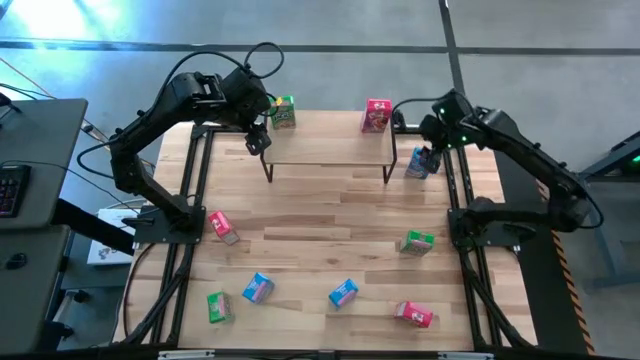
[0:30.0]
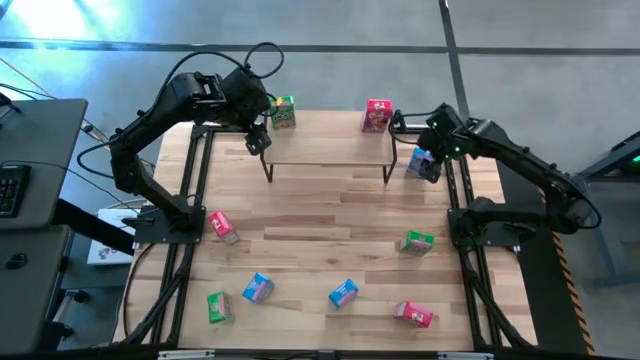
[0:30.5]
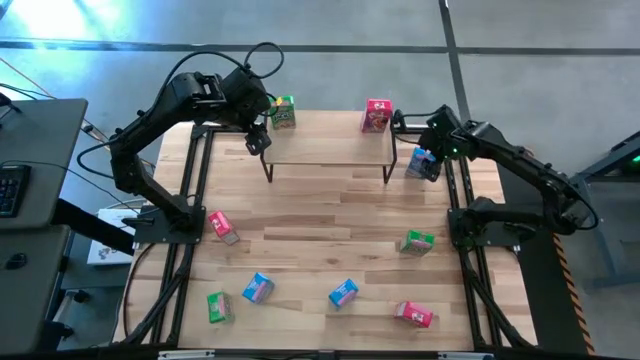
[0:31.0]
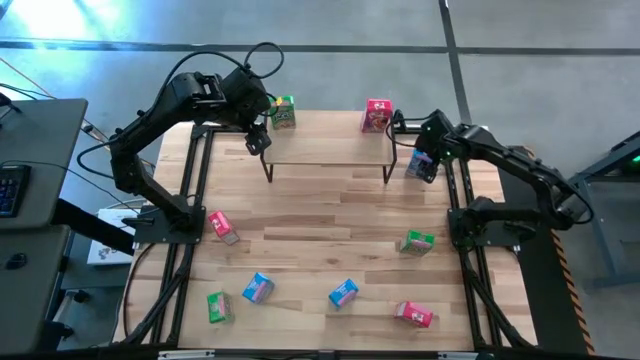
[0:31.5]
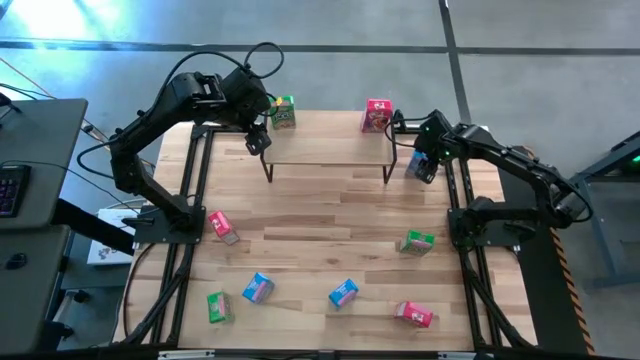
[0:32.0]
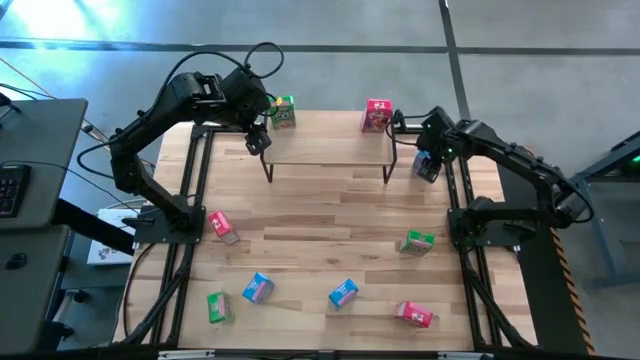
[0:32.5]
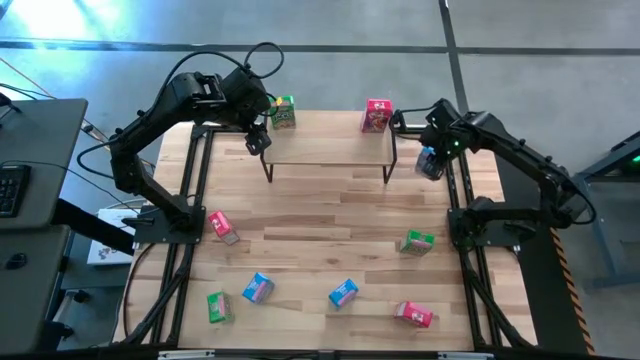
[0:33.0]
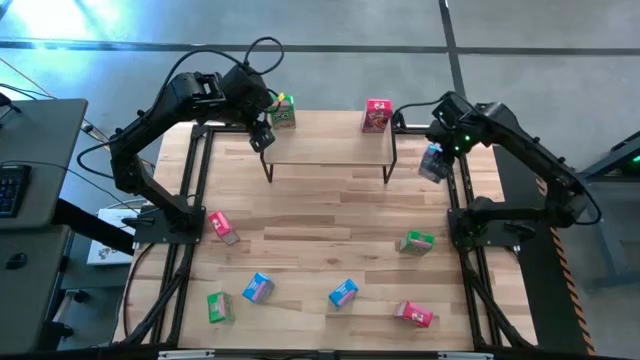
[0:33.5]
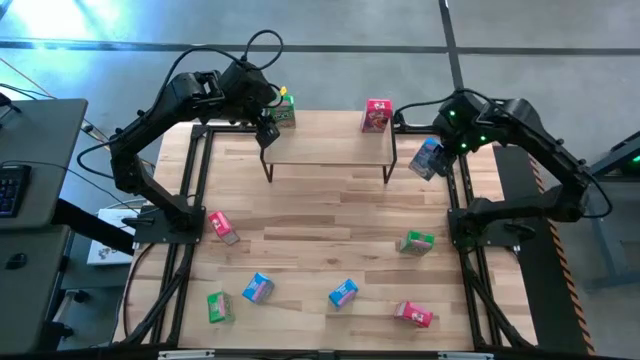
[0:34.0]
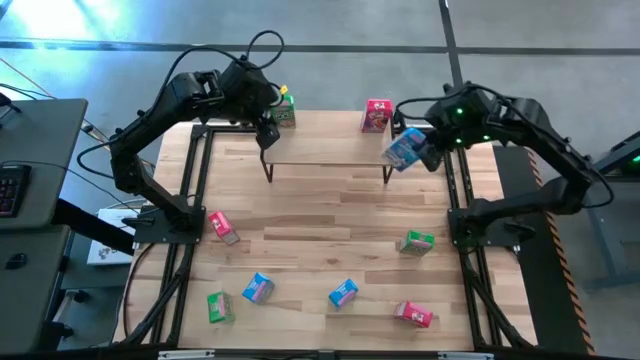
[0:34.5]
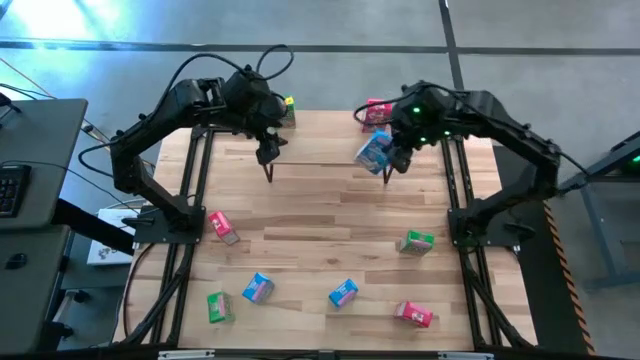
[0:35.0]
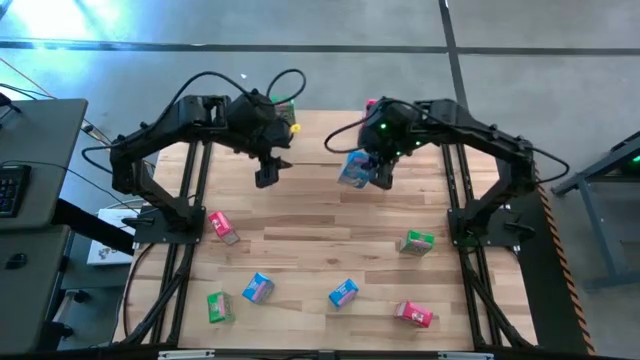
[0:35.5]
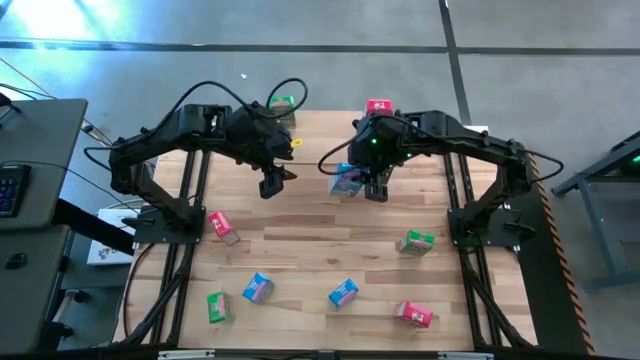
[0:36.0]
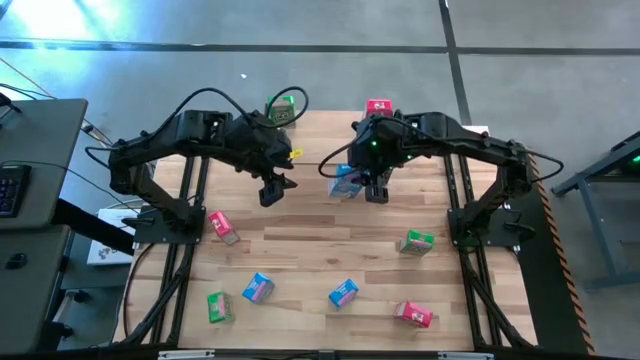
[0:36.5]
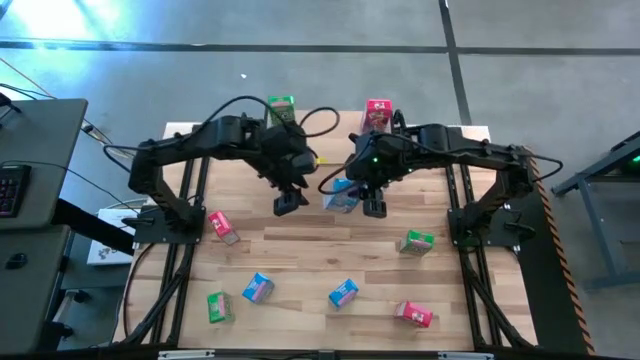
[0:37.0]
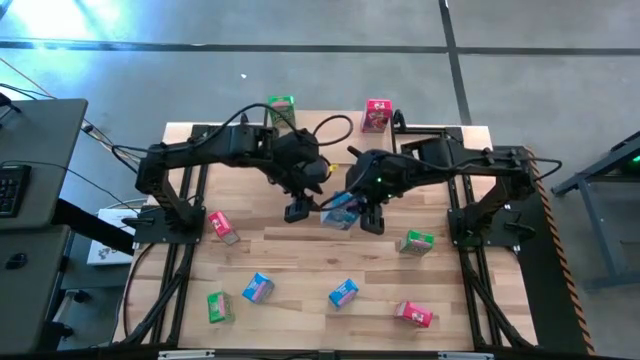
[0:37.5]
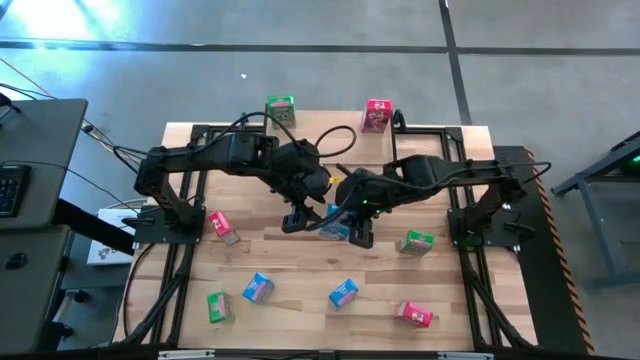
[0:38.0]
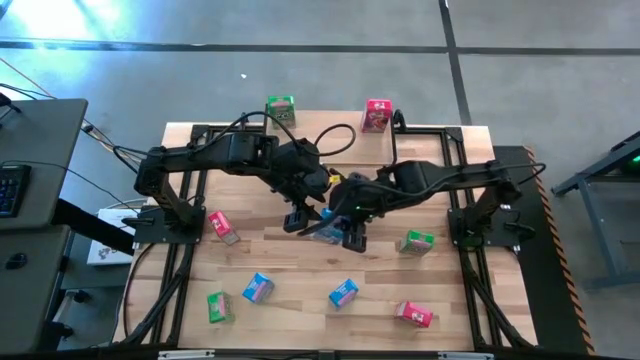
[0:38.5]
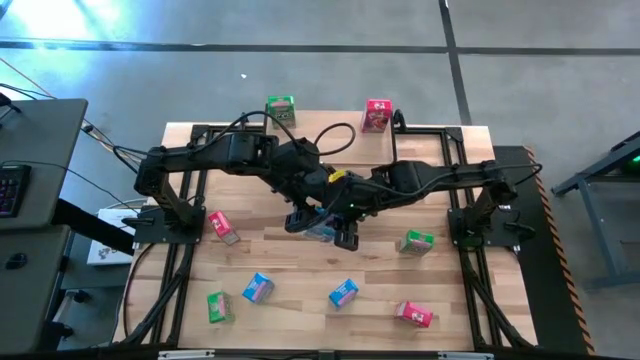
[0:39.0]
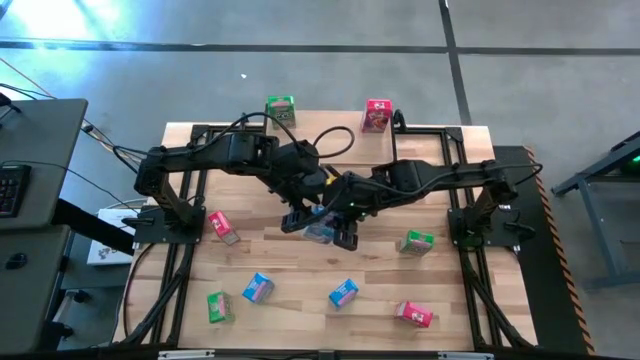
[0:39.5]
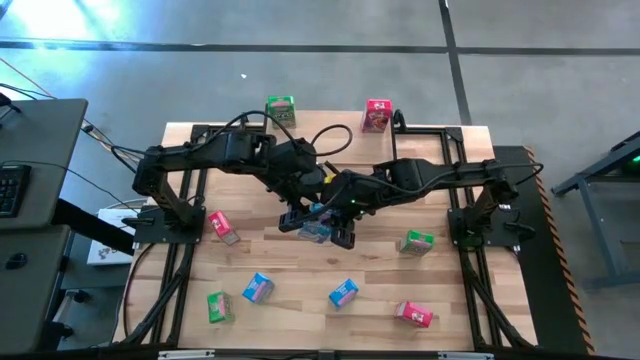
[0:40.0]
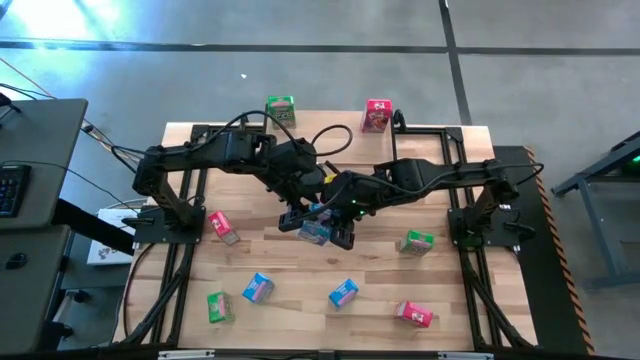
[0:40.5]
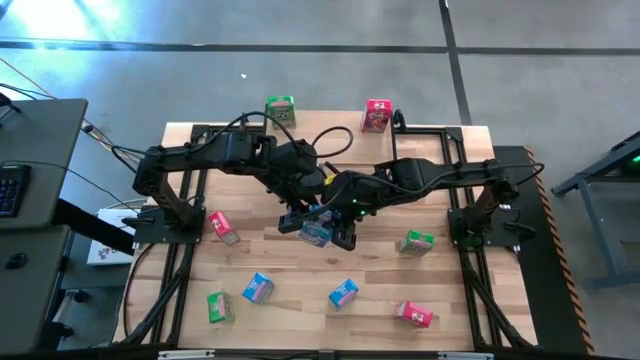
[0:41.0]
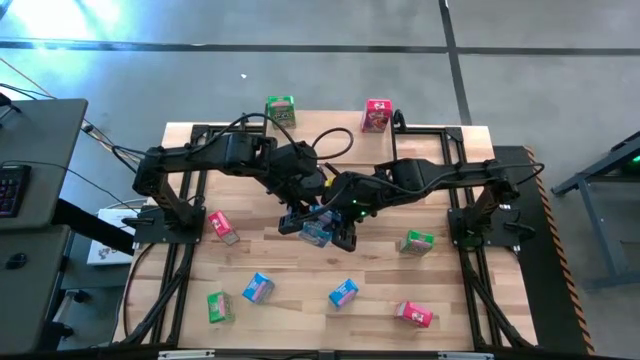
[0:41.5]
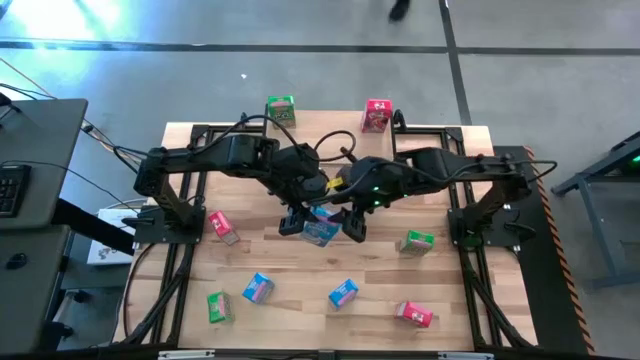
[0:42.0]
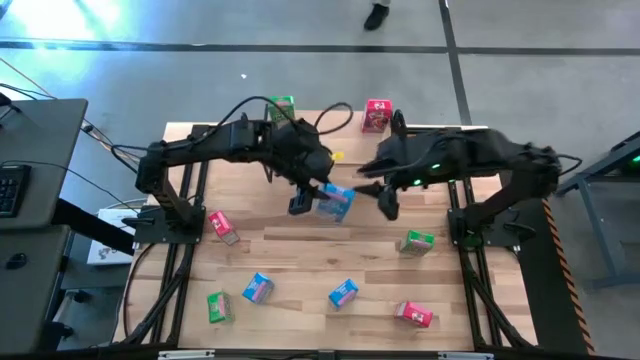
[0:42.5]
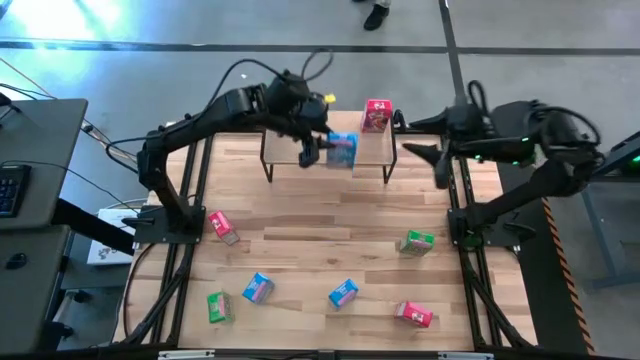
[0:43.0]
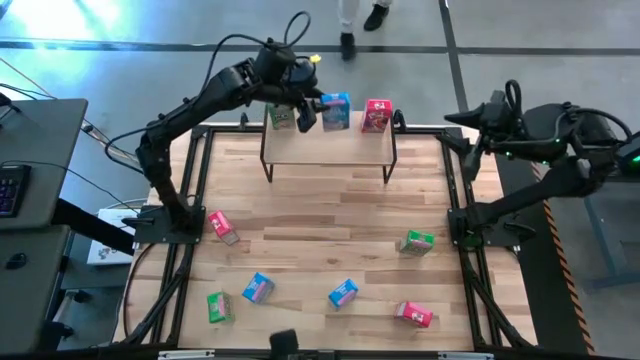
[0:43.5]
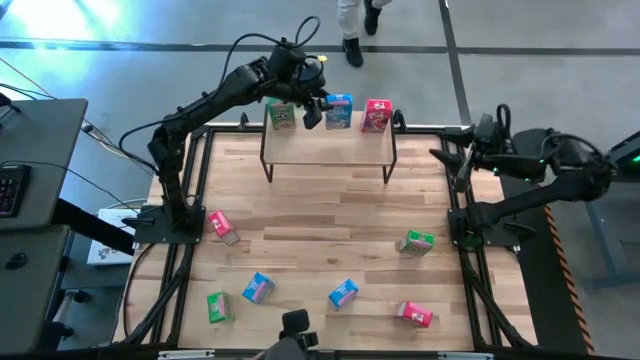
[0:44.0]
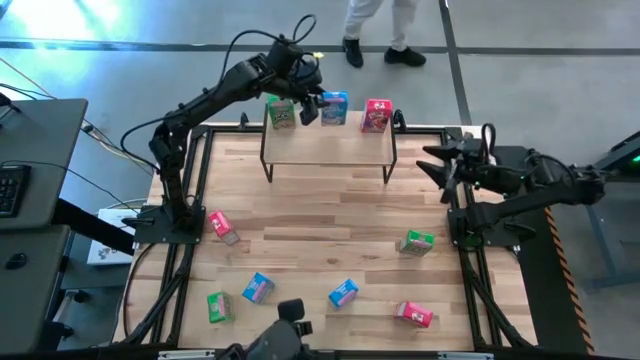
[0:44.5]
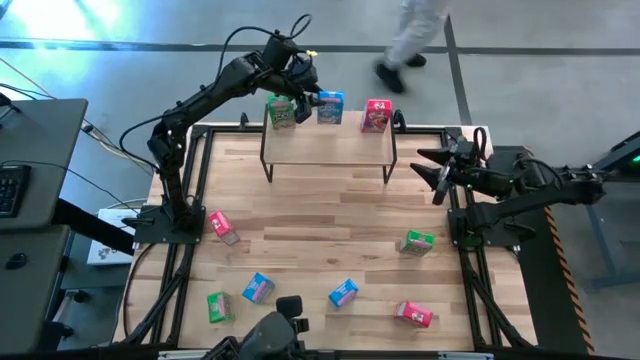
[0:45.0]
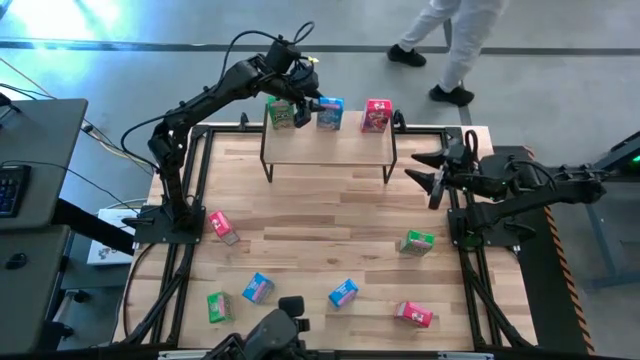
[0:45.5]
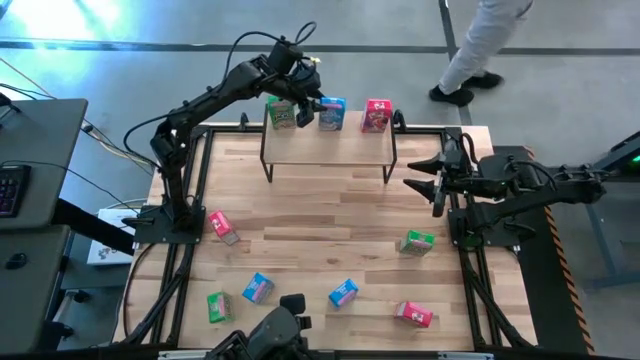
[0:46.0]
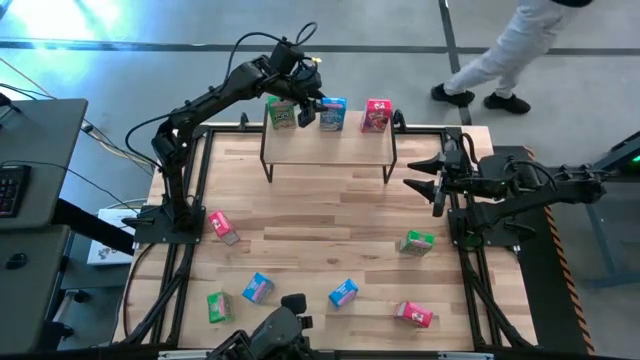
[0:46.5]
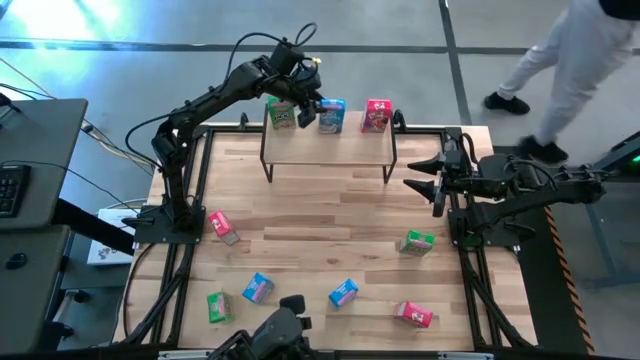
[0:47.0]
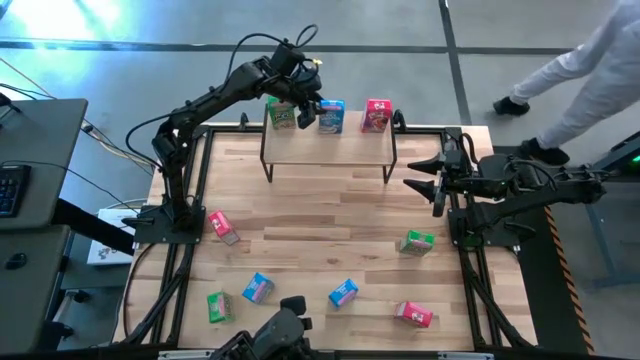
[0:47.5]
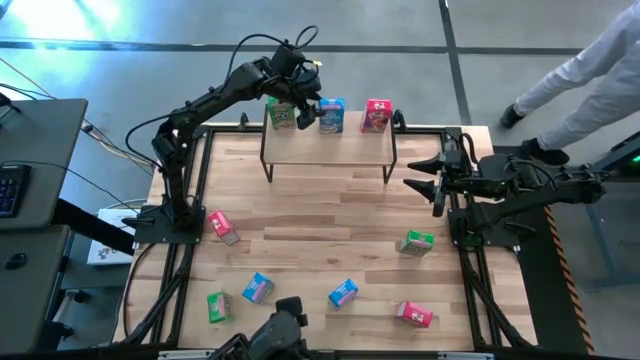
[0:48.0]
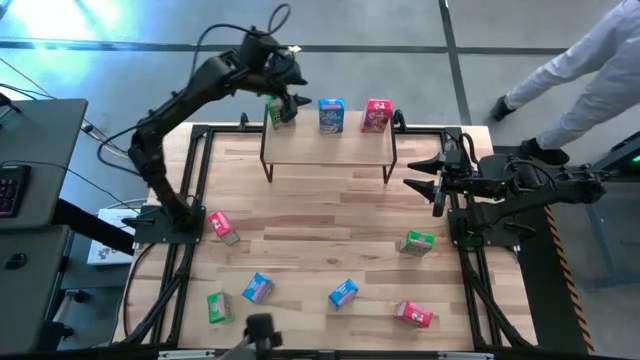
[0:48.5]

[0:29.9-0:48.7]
Task: Stack cereal on shelf
Put the top blue cereal box on the shelf

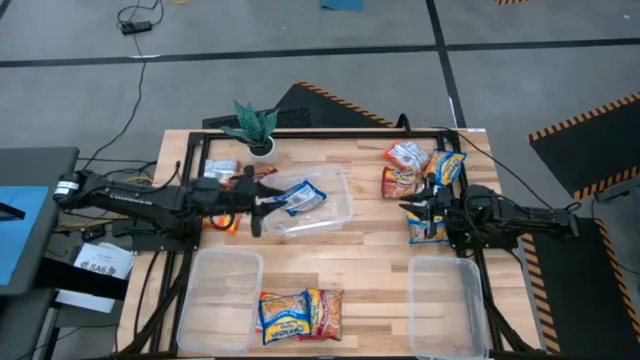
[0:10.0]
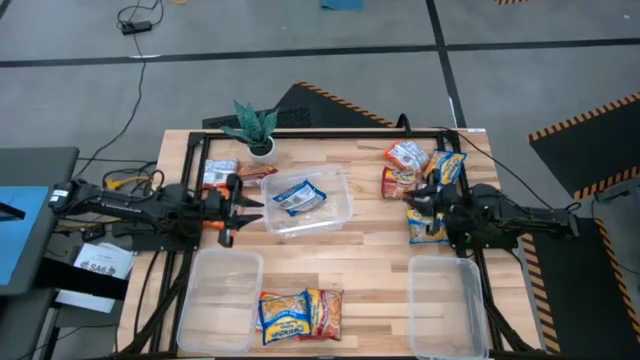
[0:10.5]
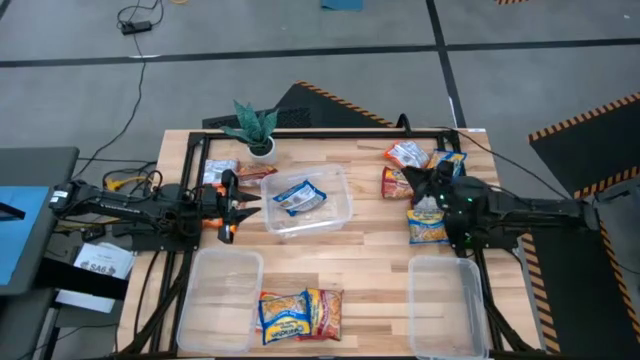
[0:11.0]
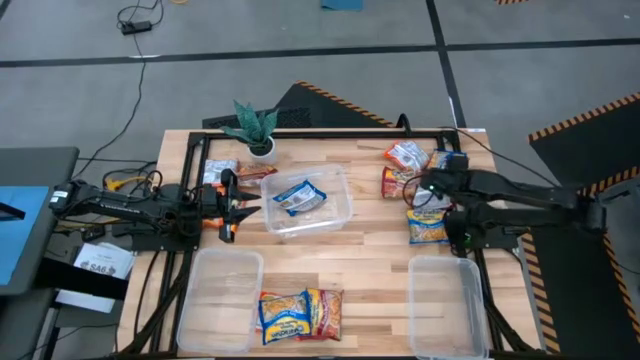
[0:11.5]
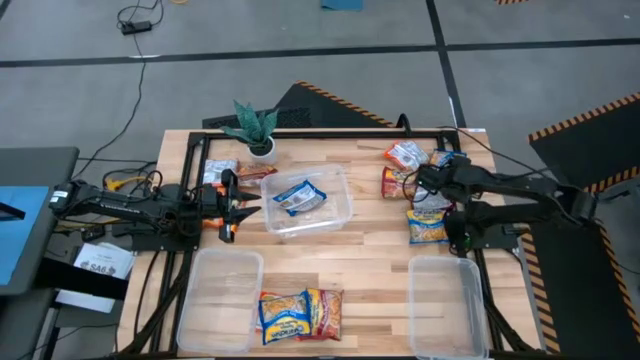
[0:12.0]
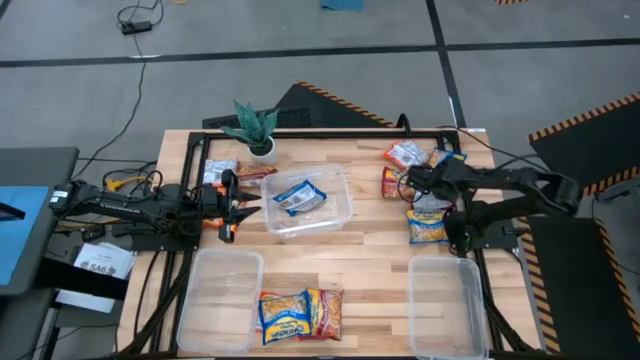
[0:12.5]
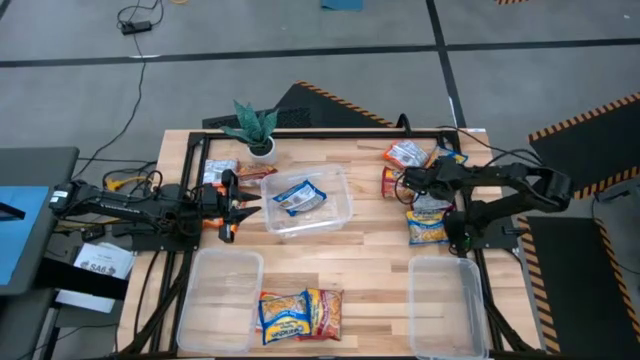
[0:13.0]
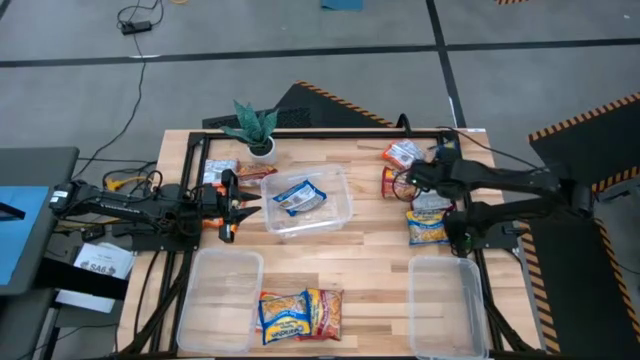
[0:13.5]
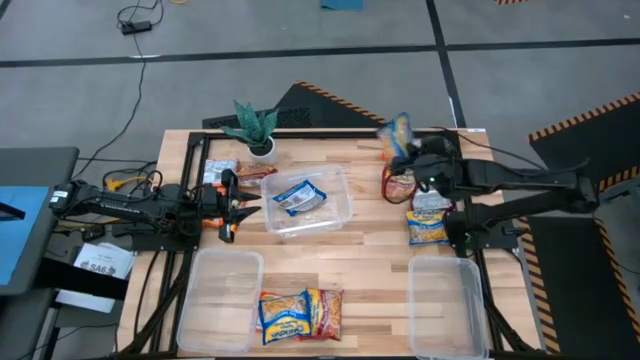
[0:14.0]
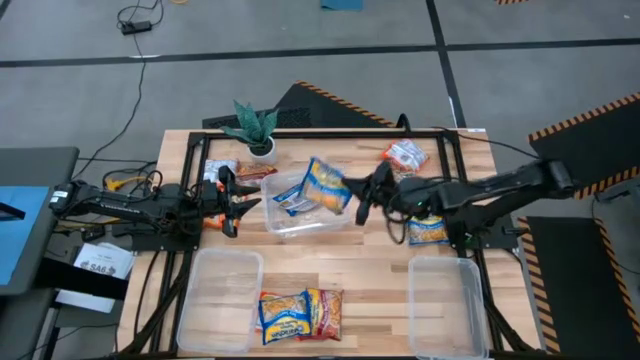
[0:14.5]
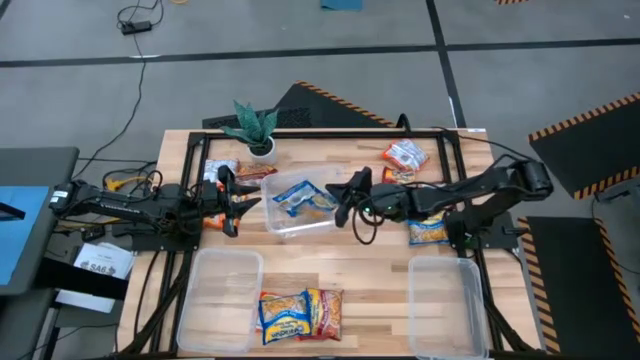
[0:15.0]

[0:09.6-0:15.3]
Task: Sort Maruchan noodles
Put the top right blue noodle packet into the top transparent bin
